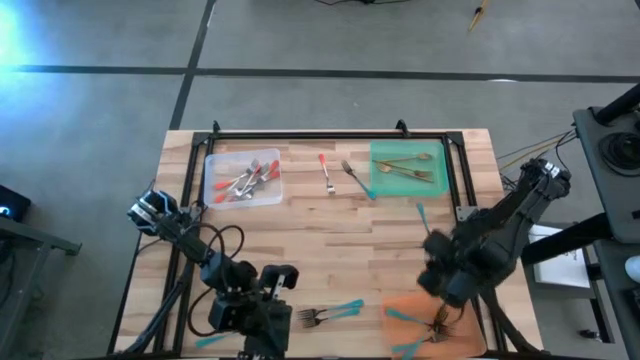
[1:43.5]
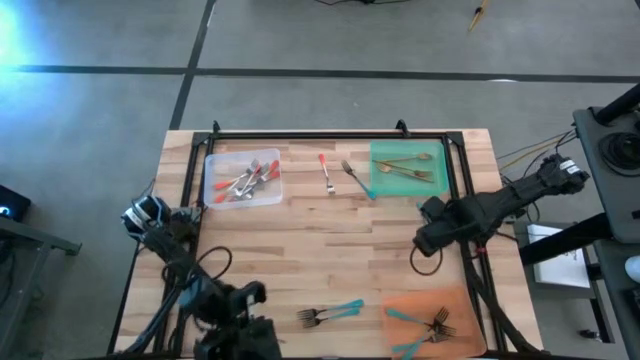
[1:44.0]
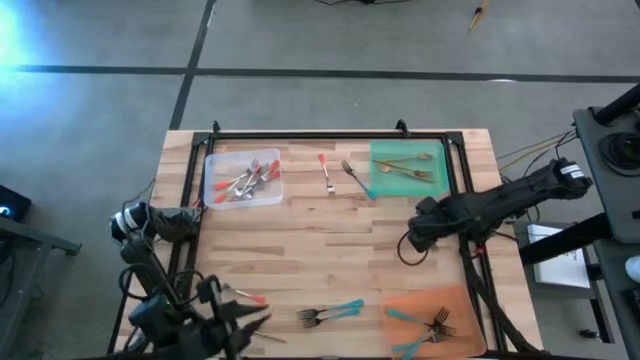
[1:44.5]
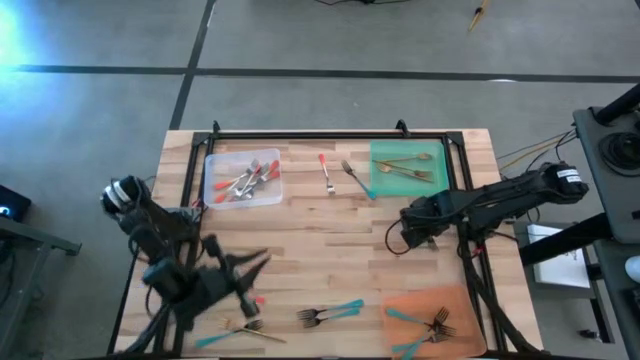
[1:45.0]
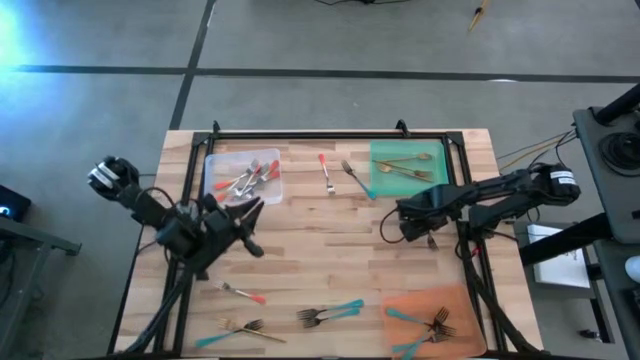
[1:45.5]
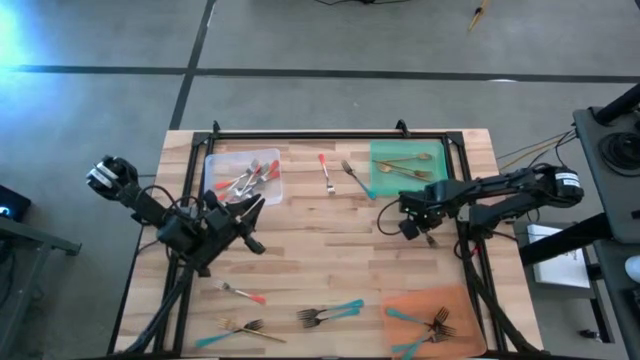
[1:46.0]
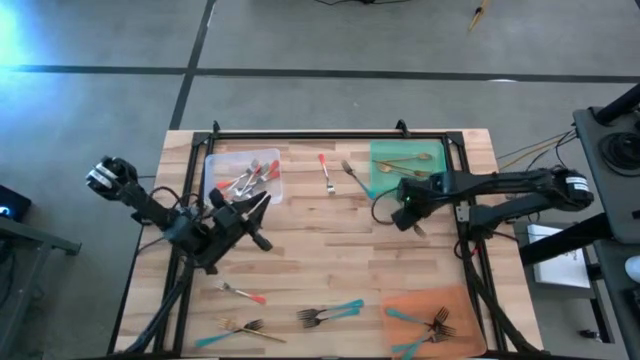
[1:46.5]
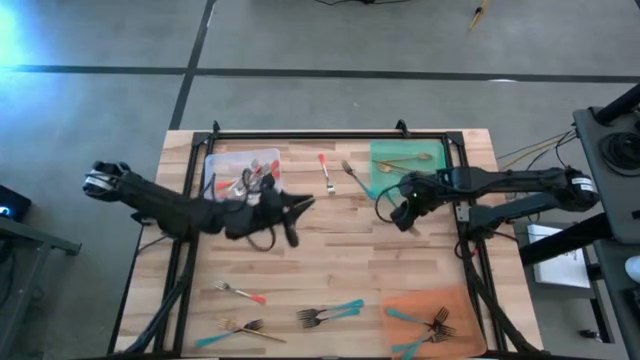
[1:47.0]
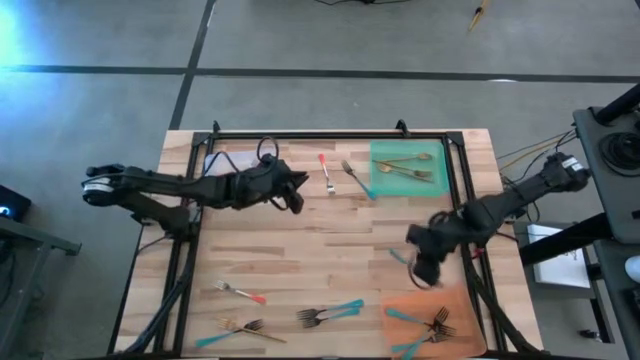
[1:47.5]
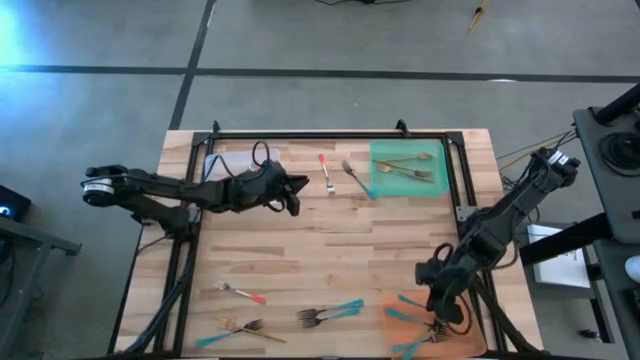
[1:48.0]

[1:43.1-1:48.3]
Task: Sort silverware by color (type)
Put the blue fork into the orange bin

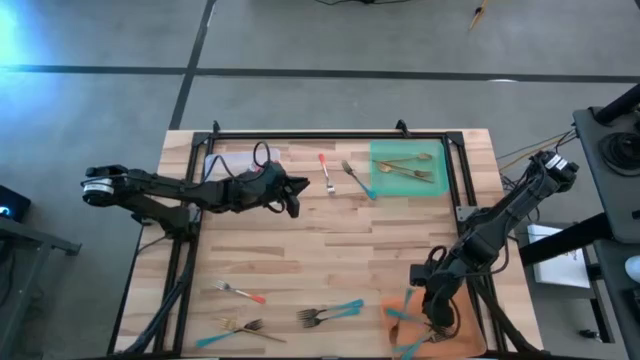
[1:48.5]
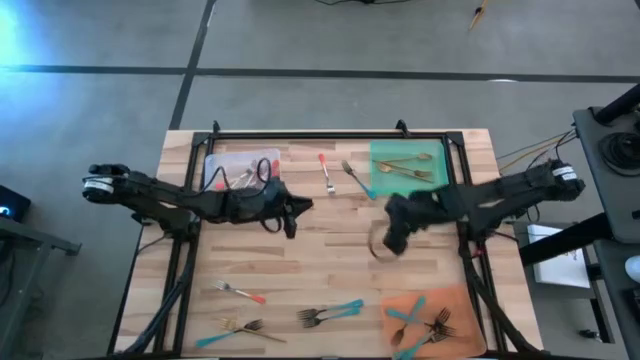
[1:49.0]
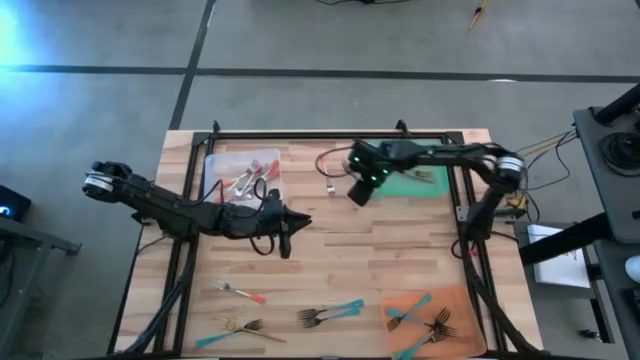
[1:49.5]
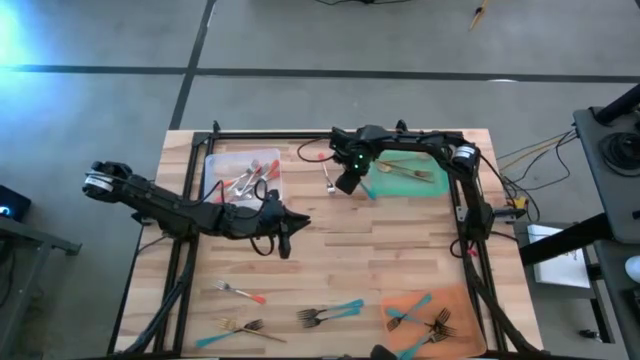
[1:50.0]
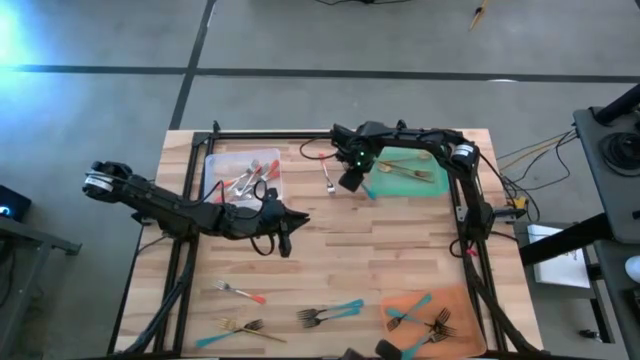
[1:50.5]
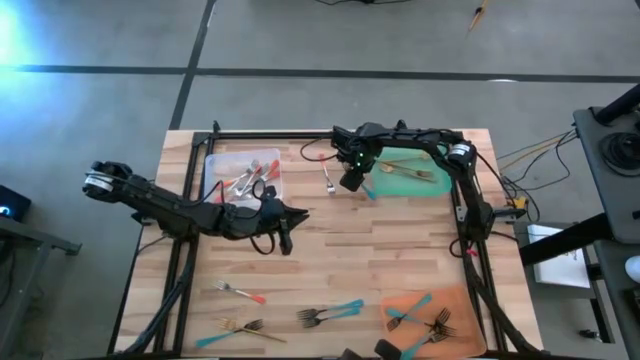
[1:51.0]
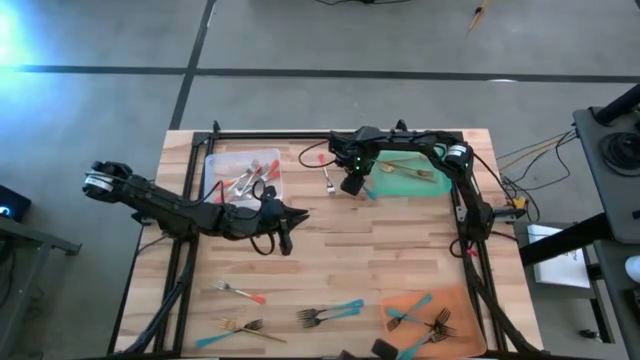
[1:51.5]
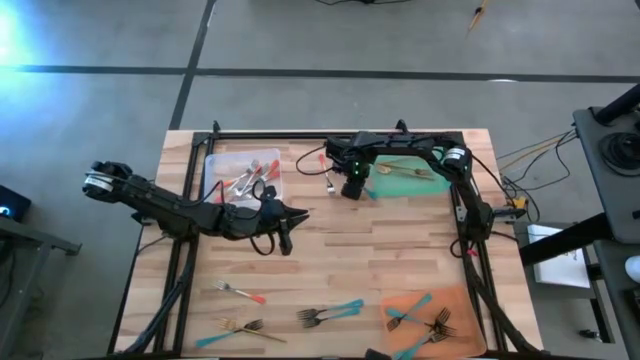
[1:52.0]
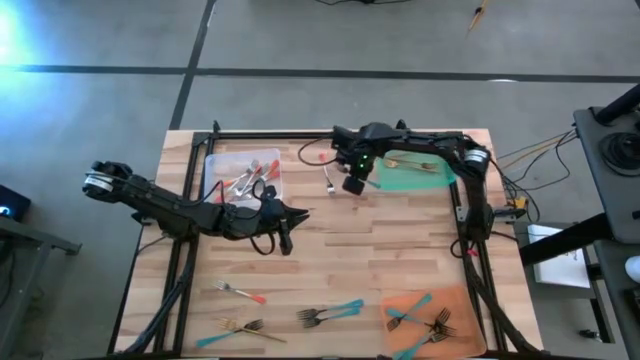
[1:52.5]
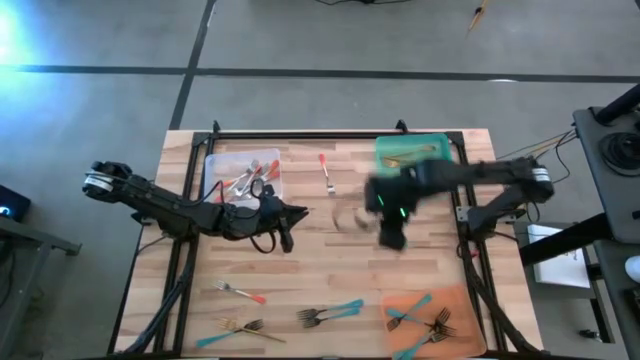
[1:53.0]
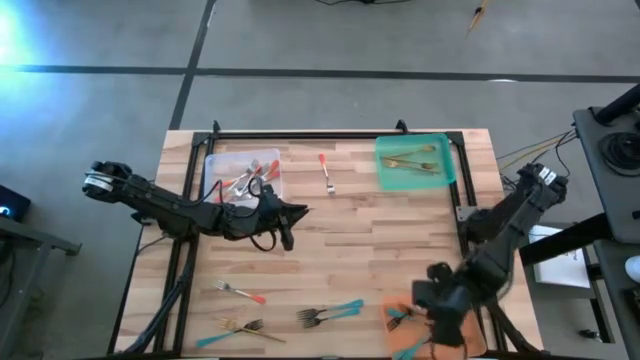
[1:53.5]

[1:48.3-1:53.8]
Put the blue fork into the orange bin

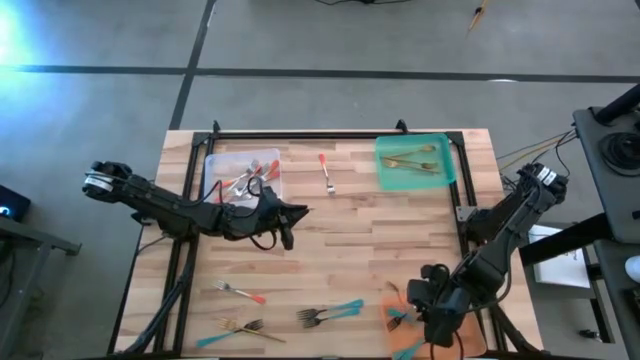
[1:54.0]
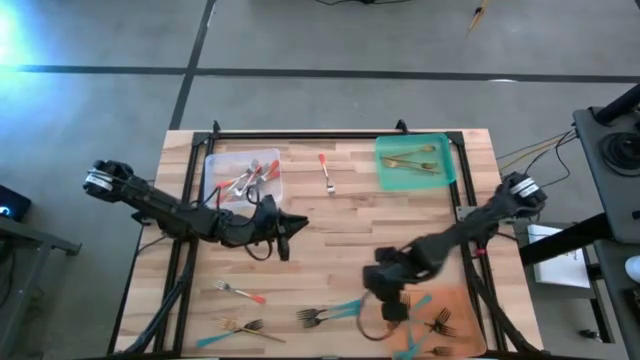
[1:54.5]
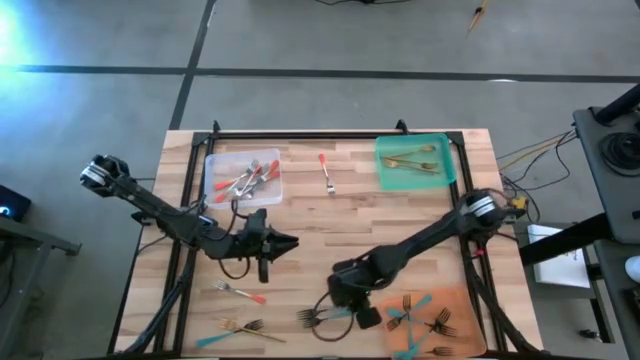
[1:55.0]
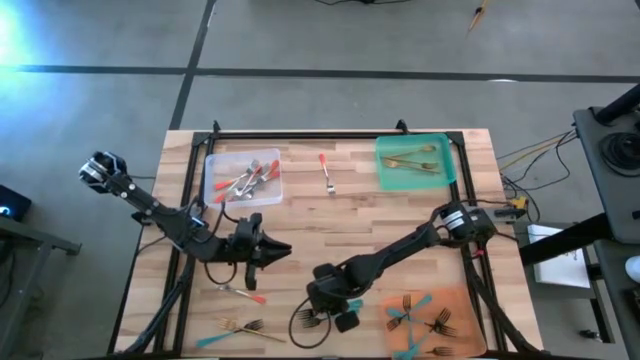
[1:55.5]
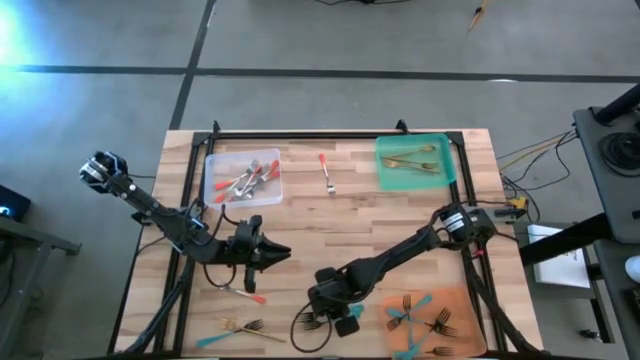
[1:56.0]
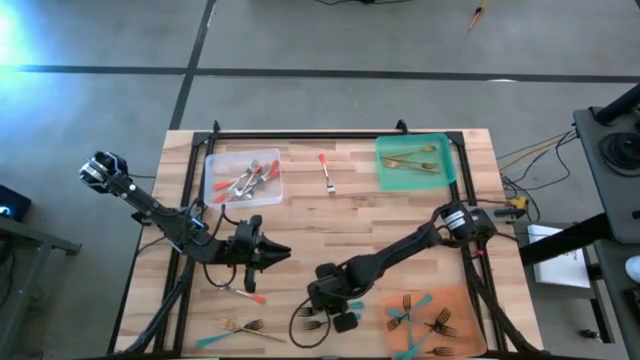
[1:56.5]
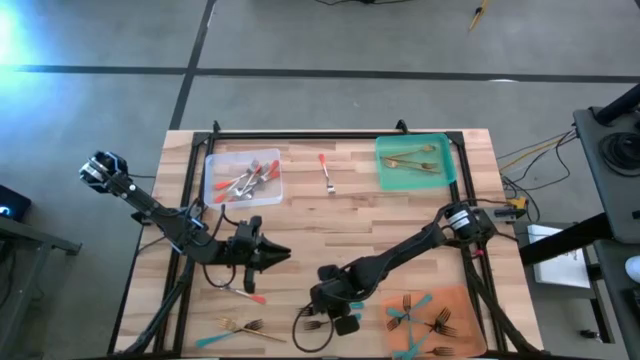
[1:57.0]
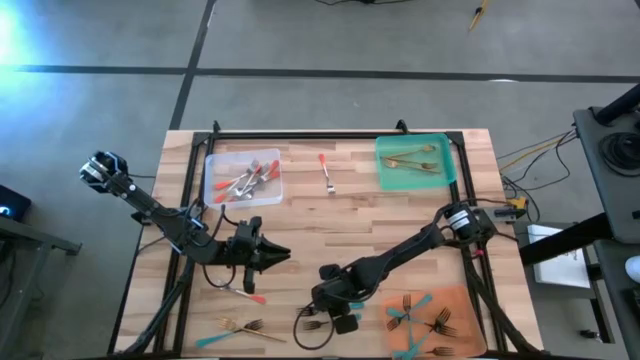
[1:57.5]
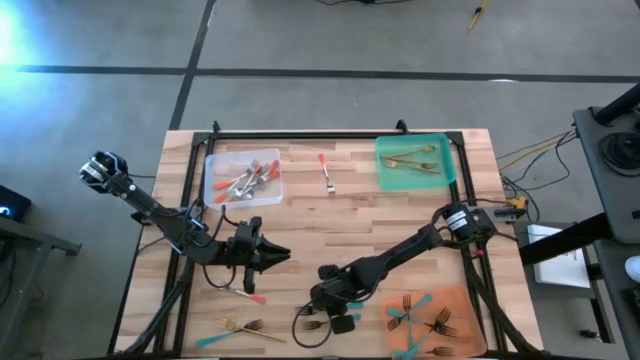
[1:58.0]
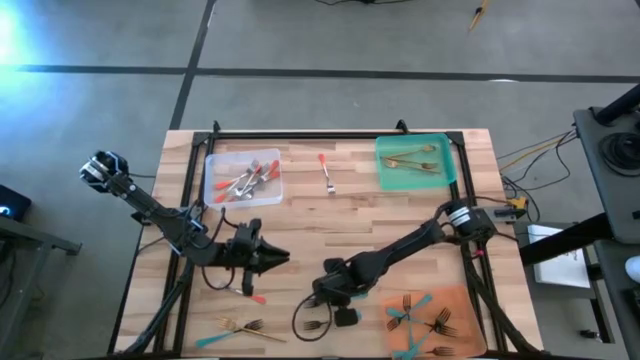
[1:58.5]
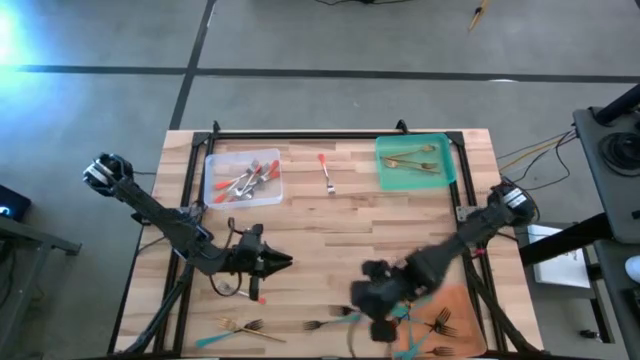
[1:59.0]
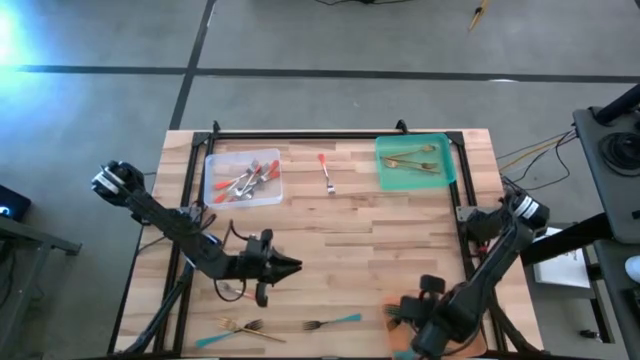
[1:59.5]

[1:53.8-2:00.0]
Put the blue fork into the orange bin

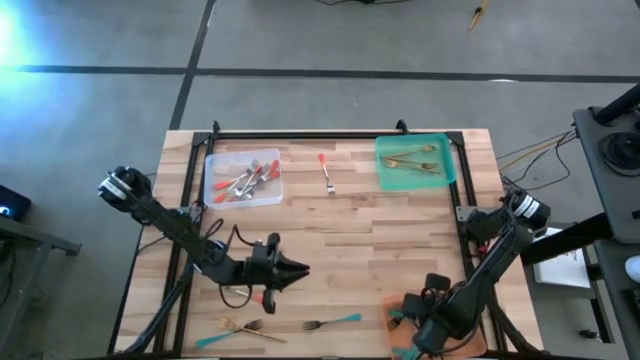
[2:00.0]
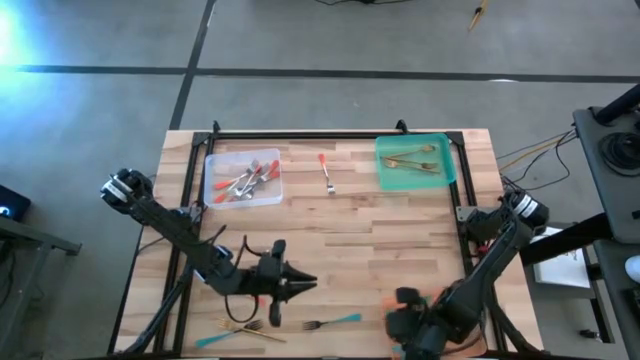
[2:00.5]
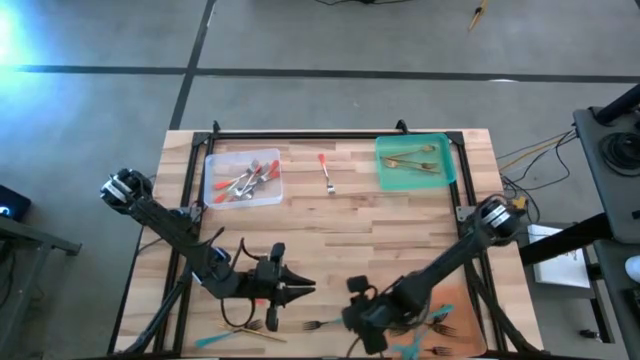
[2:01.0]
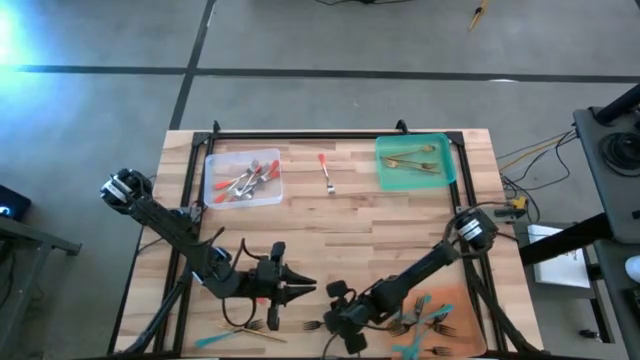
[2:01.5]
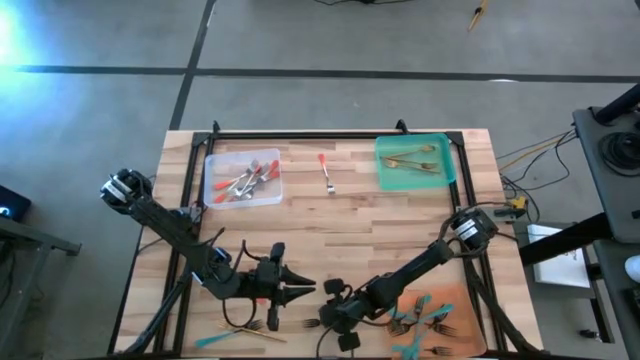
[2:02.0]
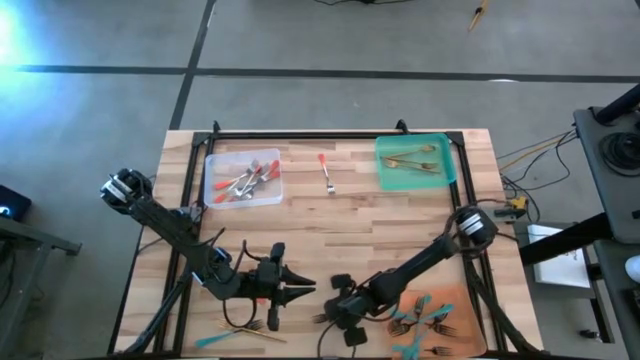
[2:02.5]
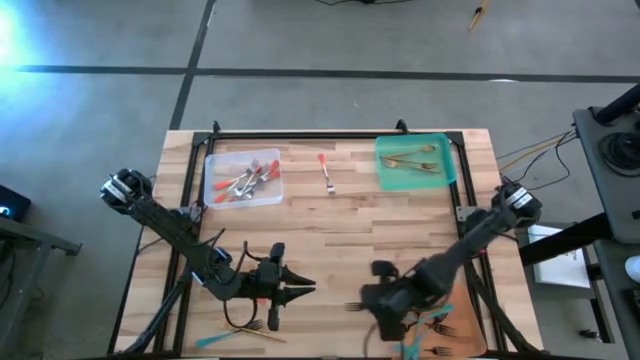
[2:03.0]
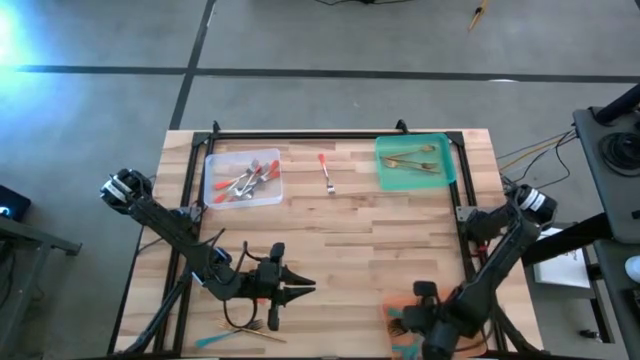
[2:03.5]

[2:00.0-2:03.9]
Put the blue fork into the orange bin

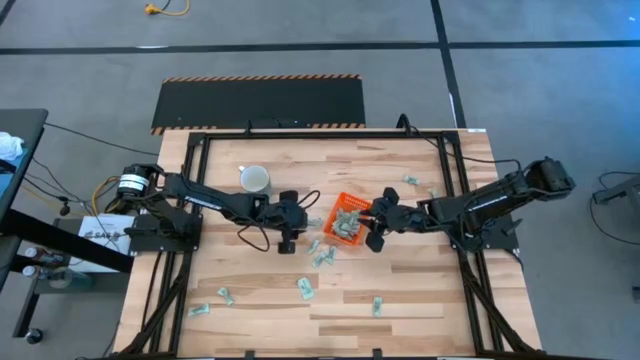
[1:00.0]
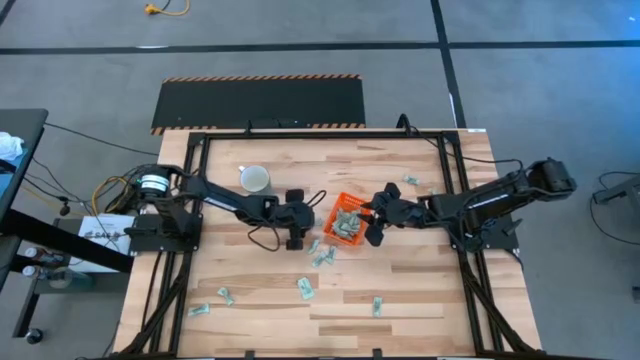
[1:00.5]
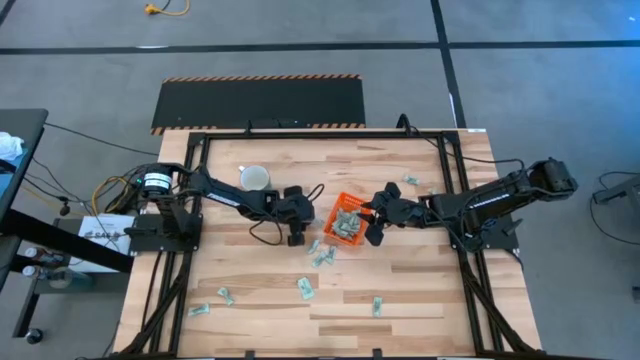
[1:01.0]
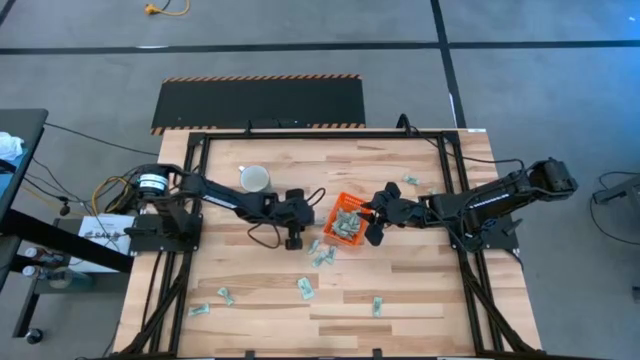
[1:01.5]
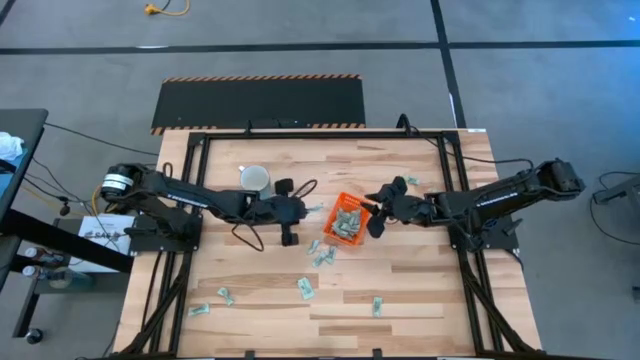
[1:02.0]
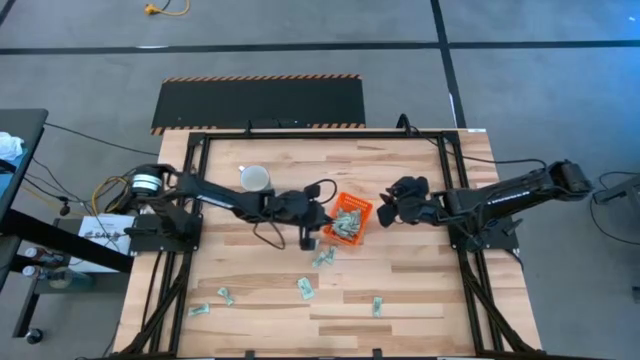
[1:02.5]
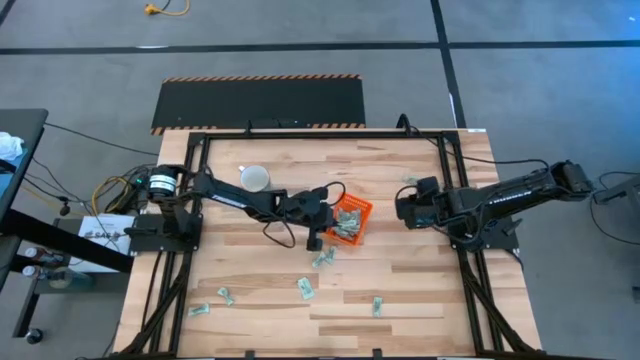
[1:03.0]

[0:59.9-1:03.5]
Task: Pick and place Stevia / Truvia into bins
Put the stevia packet into the basket
